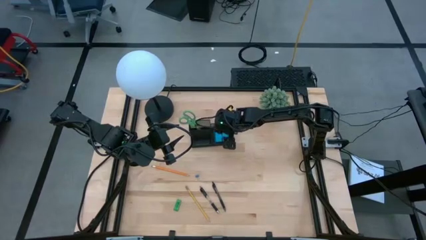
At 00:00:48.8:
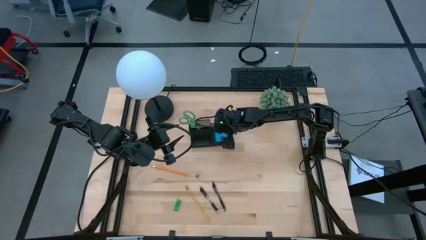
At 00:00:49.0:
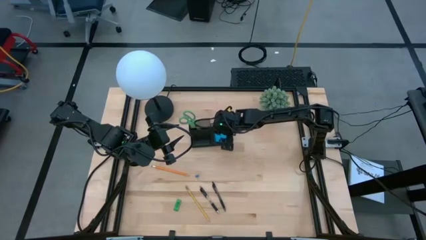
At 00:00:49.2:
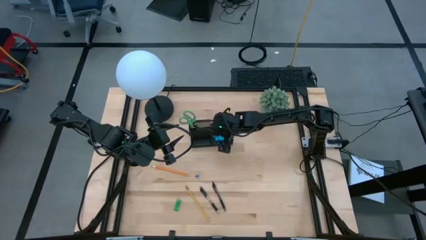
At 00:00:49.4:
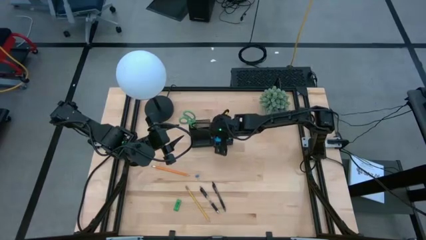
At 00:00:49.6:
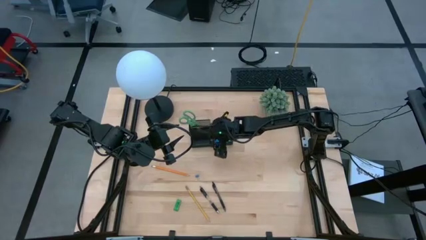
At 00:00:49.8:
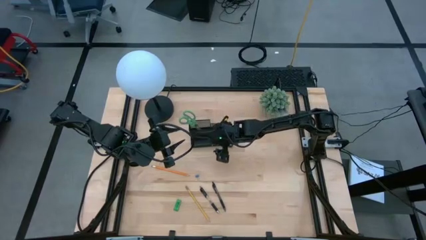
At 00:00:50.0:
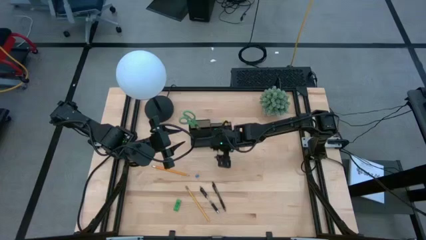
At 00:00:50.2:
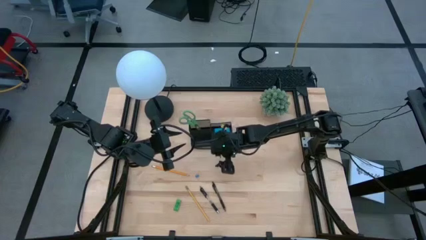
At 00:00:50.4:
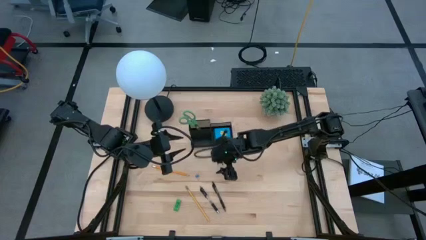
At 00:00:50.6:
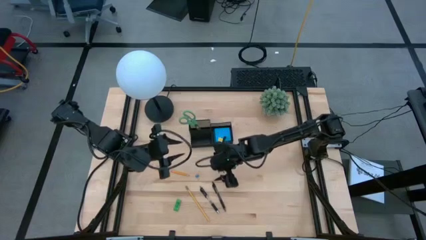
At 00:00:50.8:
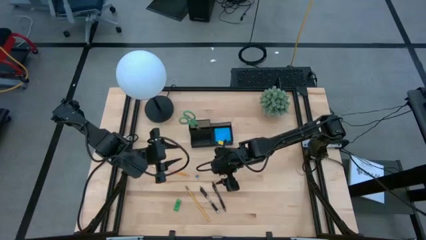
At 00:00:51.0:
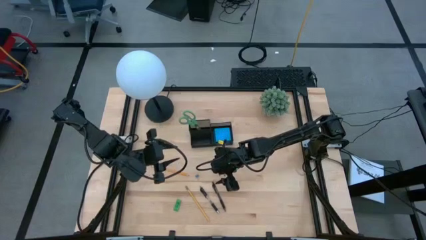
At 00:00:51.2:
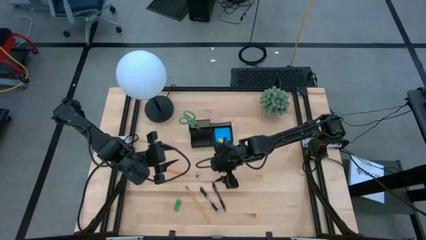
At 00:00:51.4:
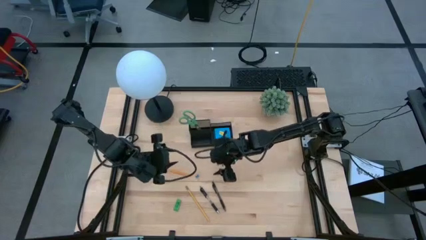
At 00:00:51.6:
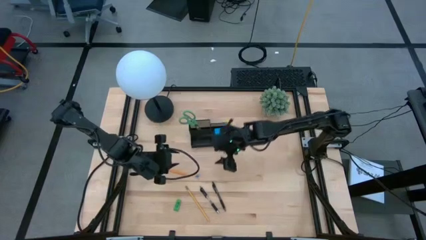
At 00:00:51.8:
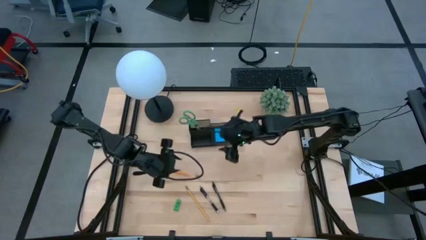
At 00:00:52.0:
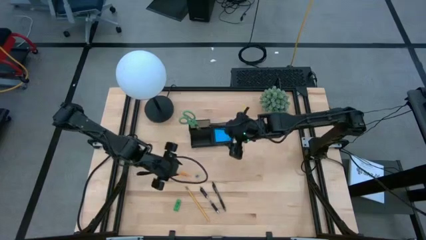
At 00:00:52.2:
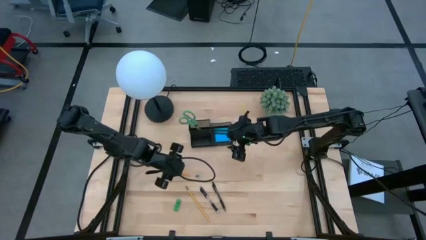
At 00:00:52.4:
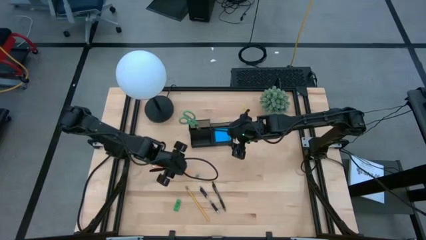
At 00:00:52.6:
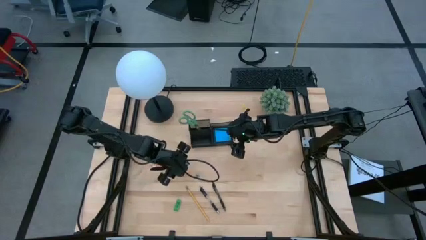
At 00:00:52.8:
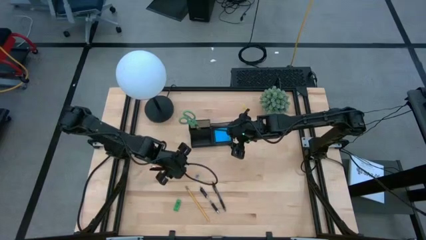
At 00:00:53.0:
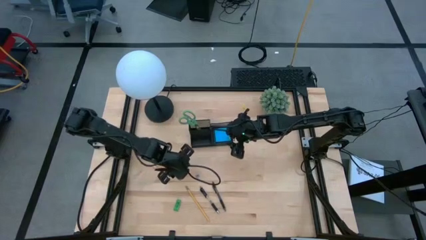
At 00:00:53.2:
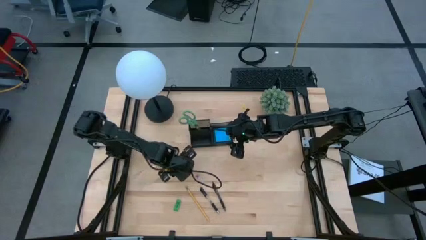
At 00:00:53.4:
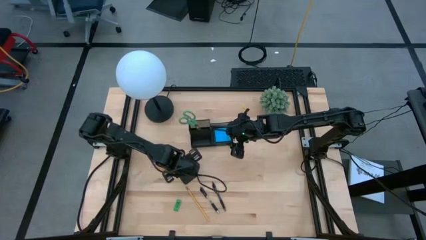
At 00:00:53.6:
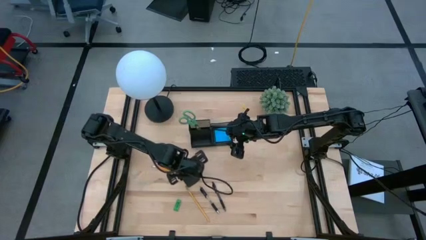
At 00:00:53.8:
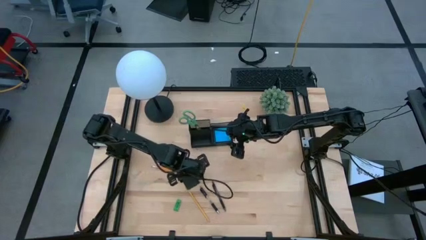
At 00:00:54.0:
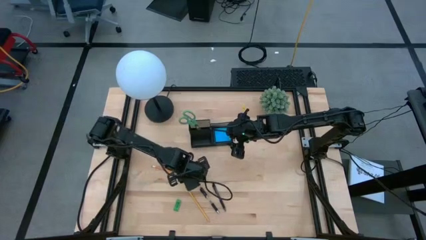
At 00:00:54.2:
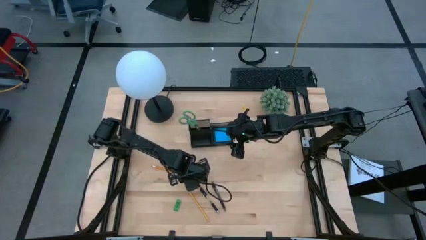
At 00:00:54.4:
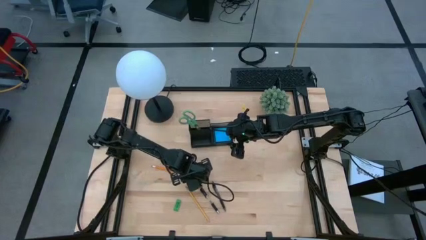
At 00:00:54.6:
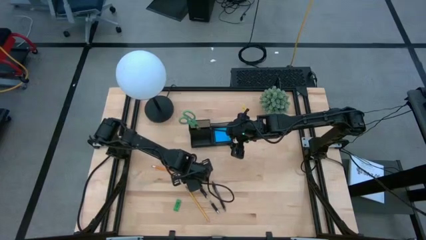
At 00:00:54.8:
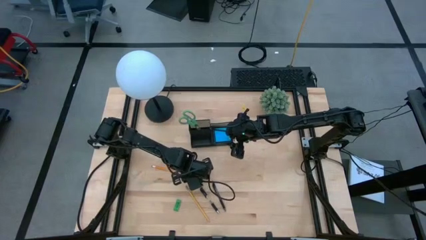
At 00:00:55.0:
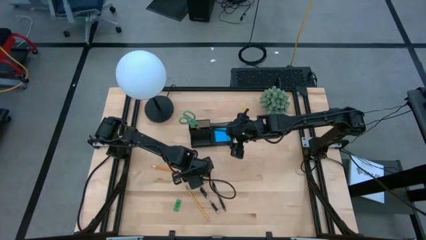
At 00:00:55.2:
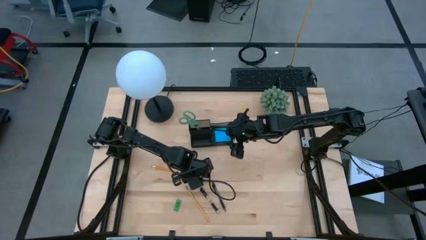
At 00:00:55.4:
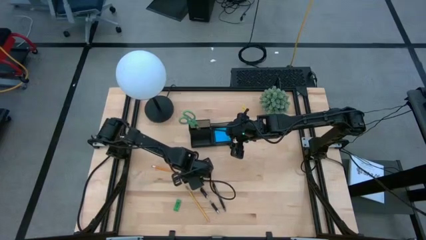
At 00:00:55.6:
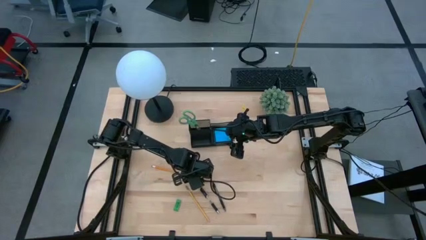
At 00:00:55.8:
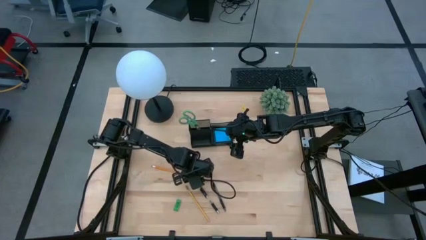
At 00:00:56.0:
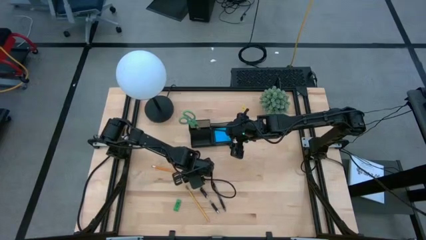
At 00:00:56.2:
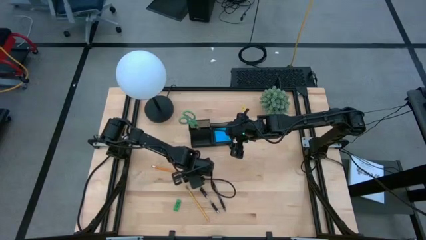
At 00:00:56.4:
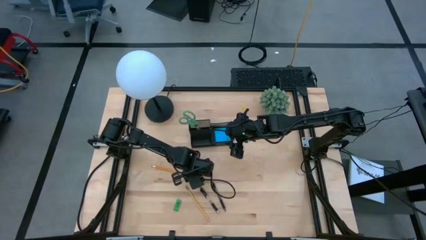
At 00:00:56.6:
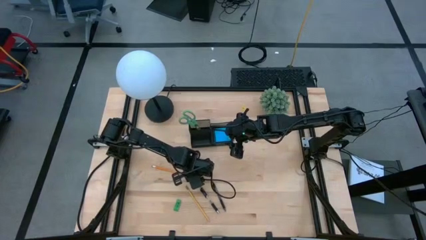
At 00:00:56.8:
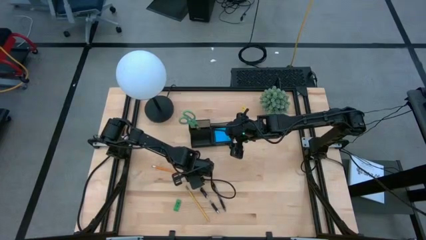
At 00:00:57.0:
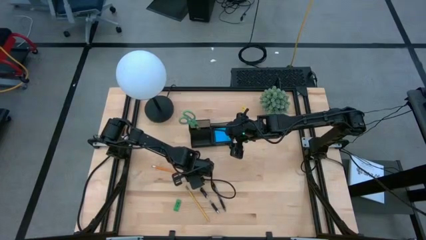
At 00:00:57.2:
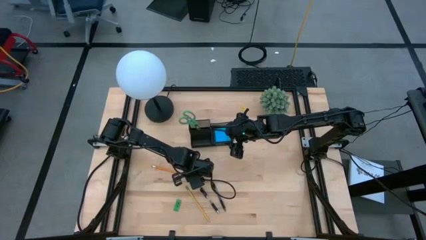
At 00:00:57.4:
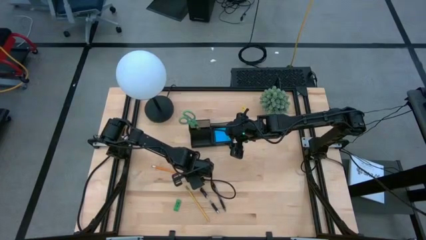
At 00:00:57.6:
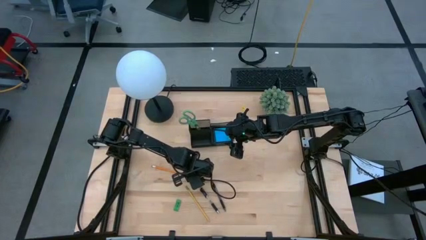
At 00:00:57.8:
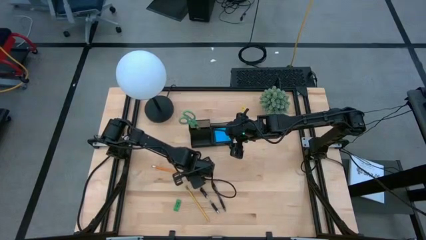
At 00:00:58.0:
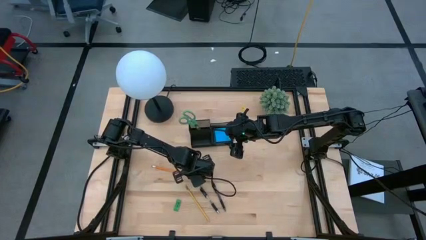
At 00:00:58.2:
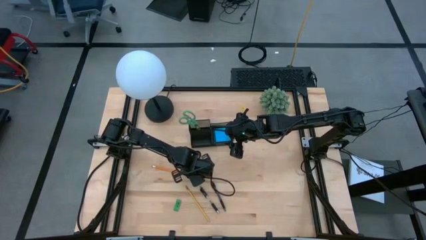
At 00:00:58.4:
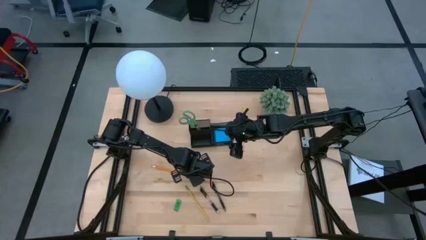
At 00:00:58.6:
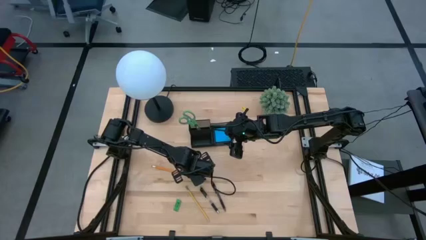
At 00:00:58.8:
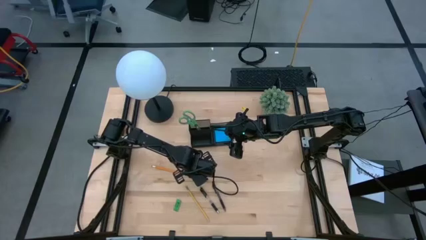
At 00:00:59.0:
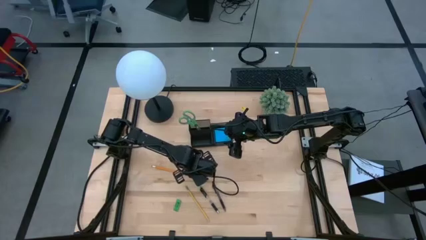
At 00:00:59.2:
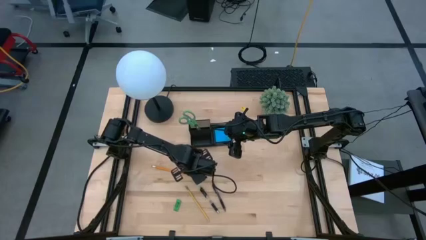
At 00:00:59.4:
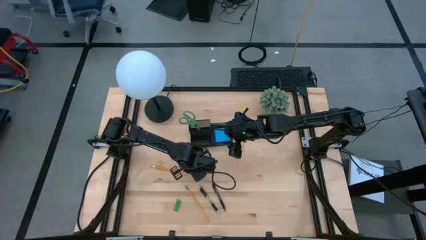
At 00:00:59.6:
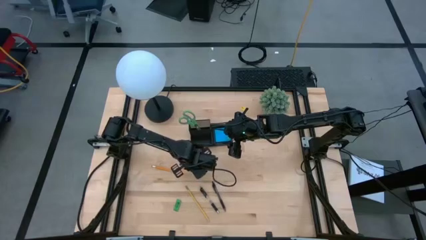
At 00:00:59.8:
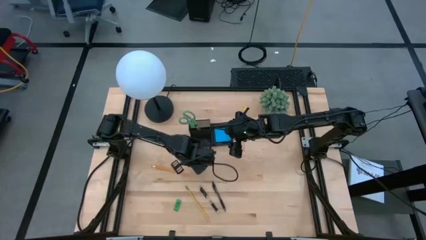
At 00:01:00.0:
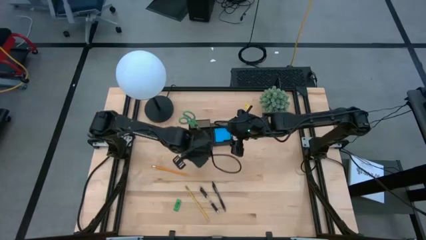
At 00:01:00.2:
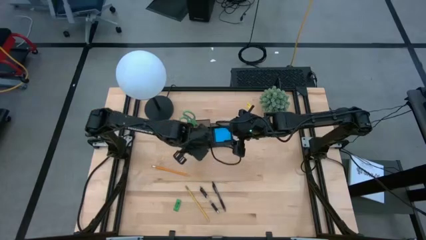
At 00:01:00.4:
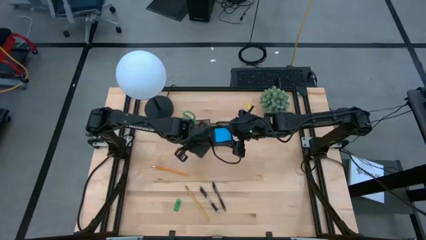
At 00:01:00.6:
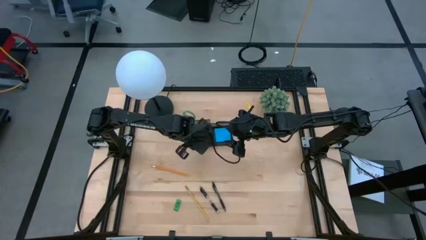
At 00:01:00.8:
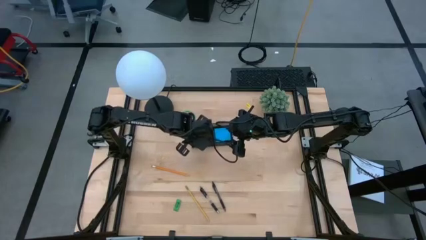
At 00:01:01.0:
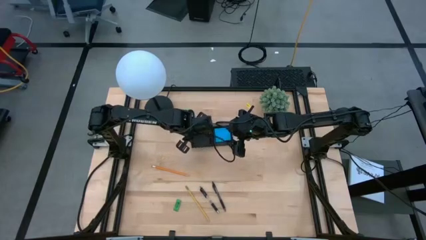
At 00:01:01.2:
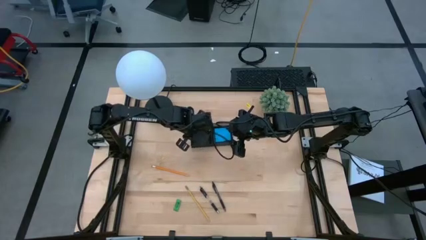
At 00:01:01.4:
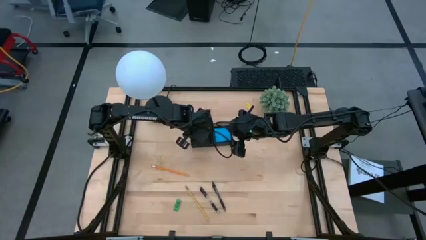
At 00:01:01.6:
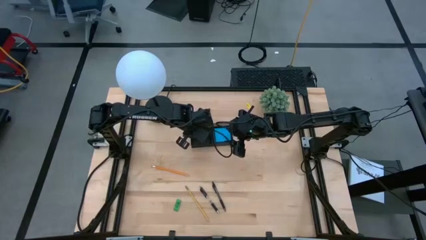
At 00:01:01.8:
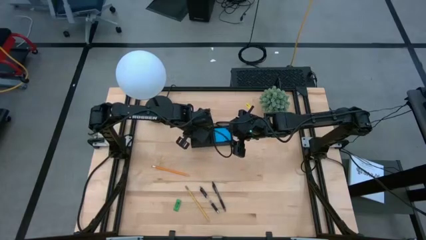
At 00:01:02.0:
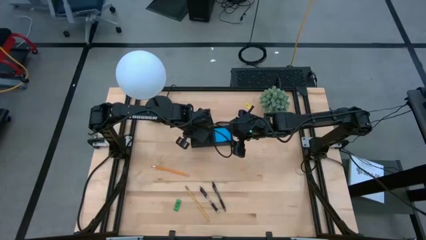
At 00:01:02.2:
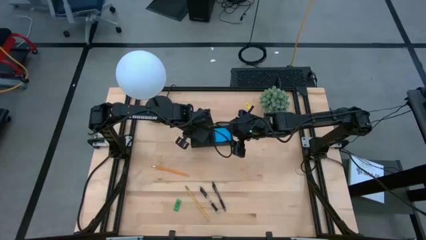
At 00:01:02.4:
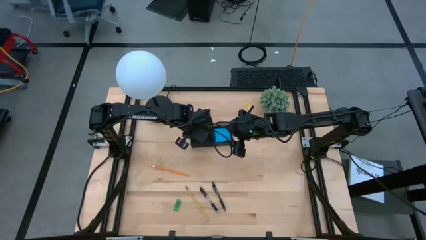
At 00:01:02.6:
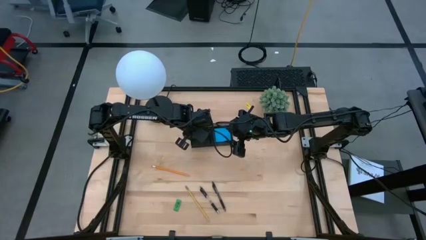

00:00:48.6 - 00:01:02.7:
Task: Pick and place office supplies into organizer
Put the blue binder clip into the black desk organizer

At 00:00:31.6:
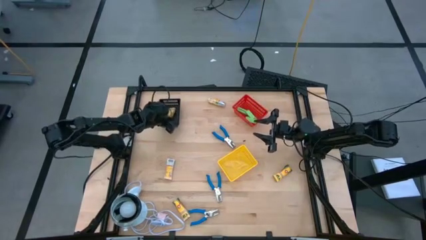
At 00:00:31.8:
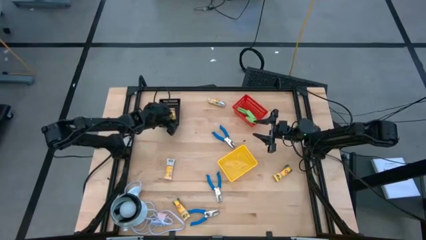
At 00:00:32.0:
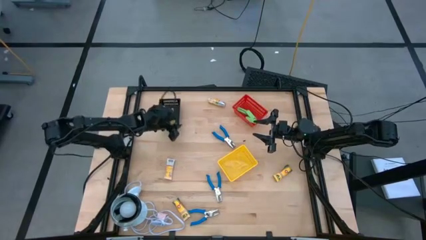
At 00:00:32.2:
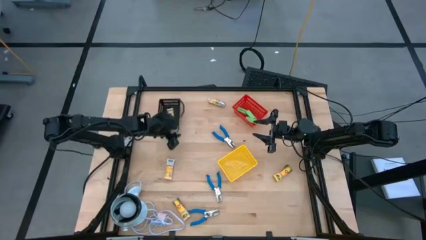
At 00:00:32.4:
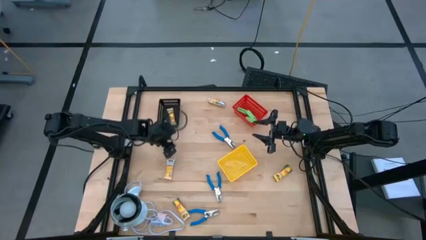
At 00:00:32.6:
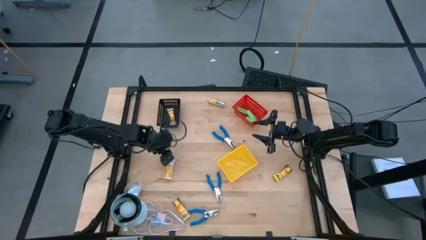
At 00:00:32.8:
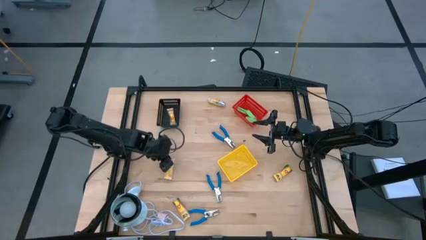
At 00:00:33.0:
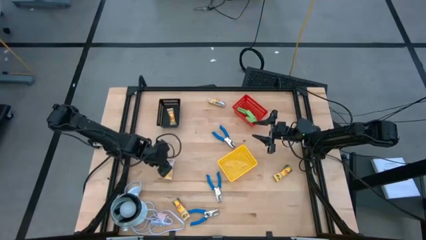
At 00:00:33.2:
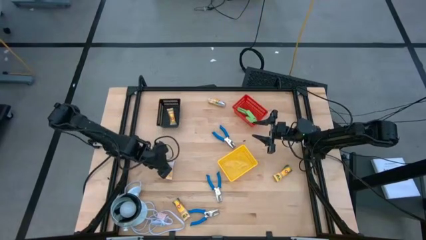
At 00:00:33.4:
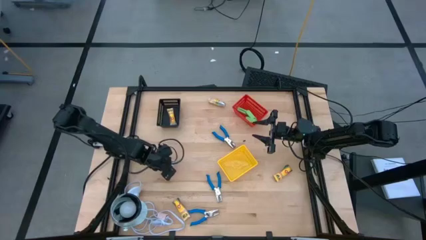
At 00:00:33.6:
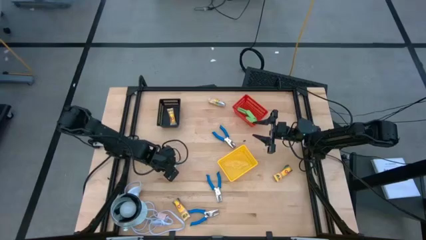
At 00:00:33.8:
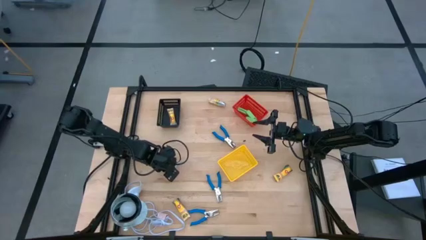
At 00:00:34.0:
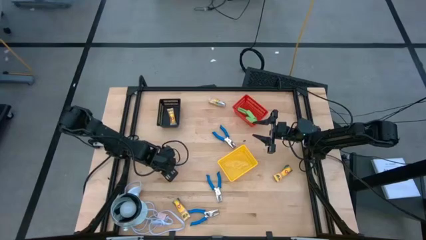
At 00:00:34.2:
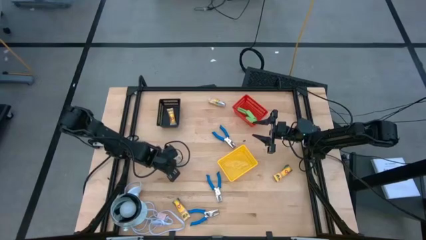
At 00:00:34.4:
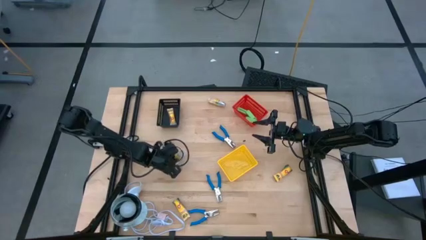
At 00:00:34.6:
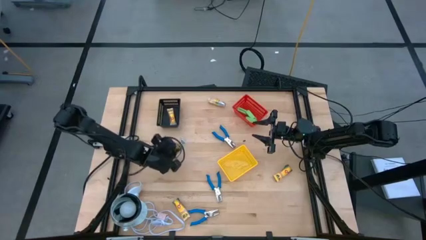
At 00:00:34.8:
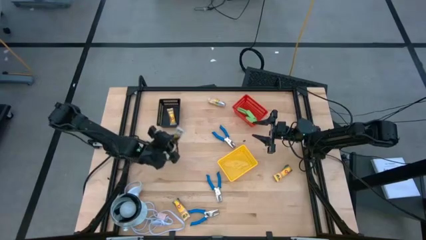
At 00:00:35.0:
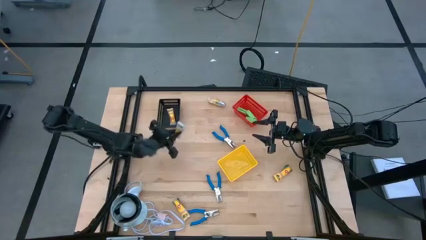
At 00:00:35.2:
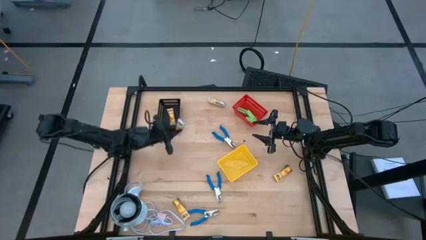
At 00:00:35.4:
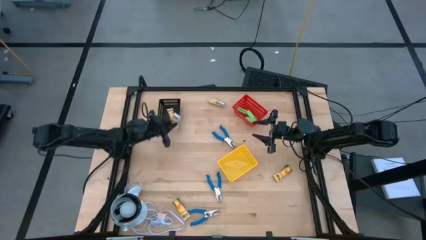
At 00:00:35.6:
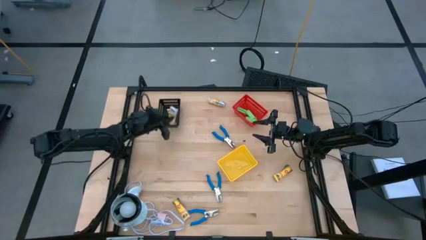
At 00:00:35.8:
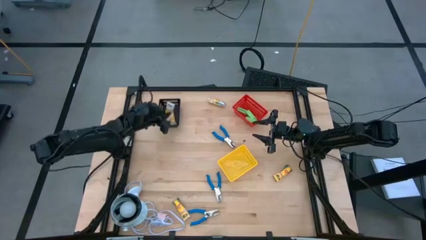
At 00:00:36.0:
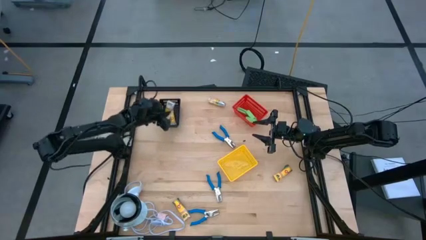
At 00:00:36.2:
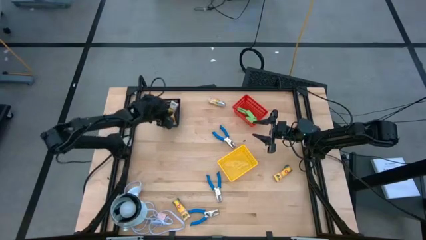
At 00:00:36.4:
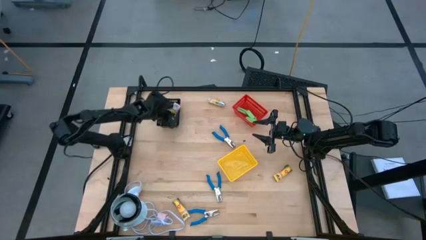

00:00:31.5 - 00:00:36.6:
Task: Pick & Place School Supplies
Put the yellow crayon pack into the black bin
